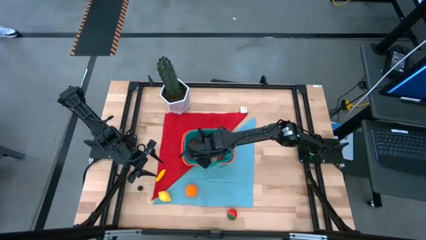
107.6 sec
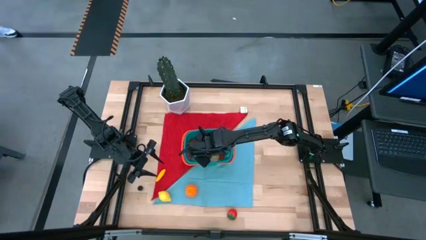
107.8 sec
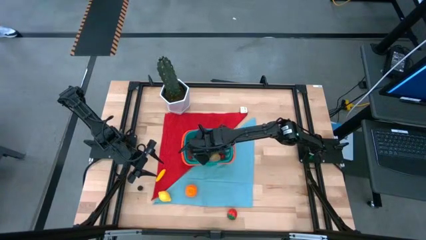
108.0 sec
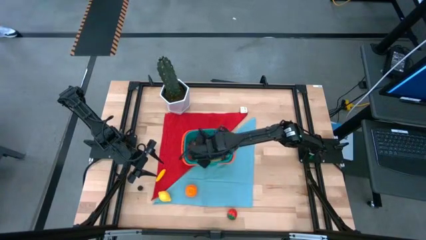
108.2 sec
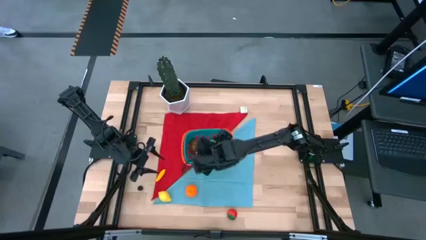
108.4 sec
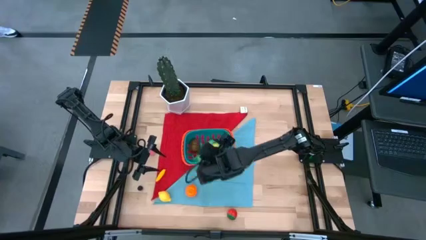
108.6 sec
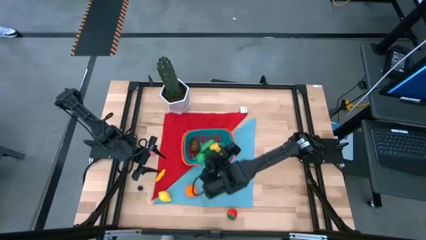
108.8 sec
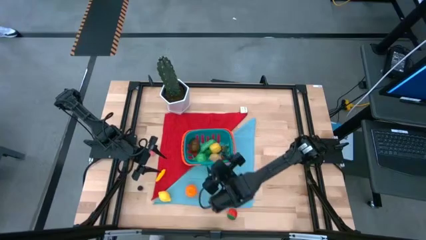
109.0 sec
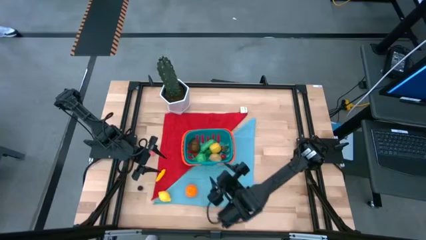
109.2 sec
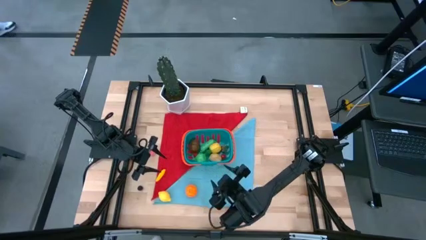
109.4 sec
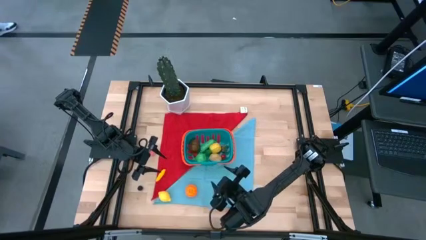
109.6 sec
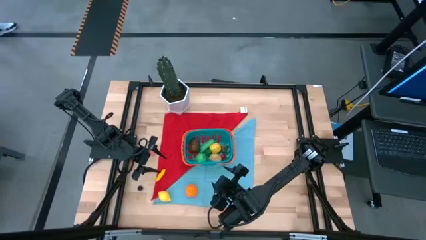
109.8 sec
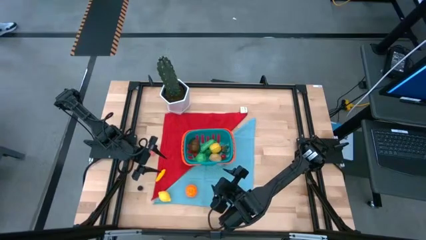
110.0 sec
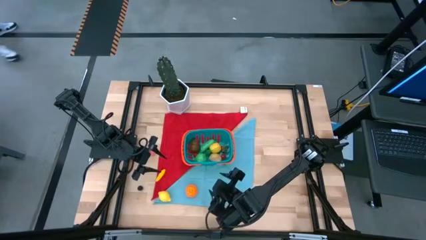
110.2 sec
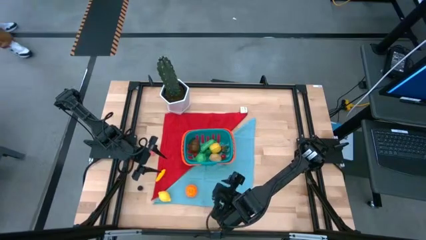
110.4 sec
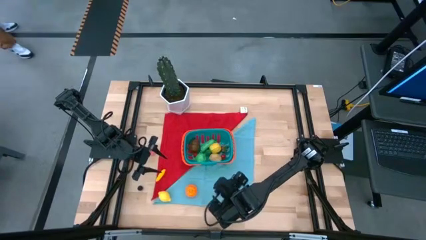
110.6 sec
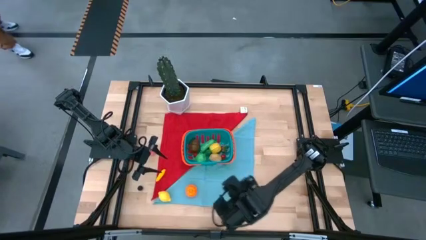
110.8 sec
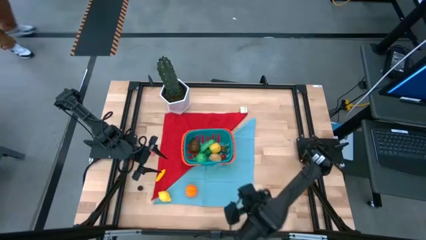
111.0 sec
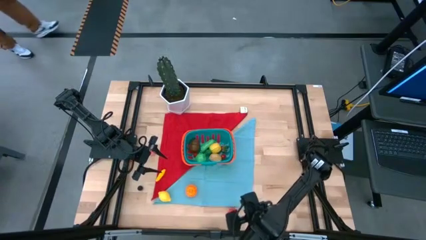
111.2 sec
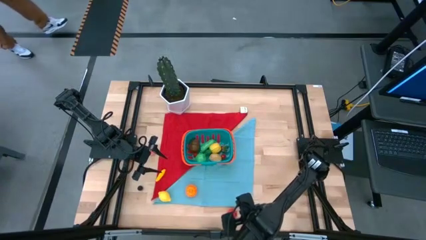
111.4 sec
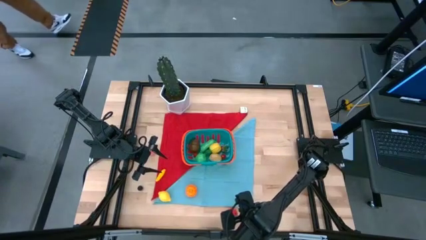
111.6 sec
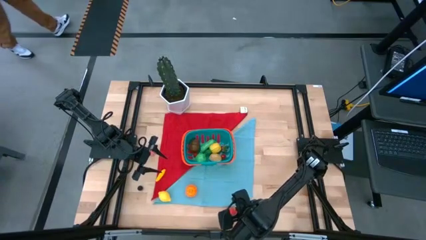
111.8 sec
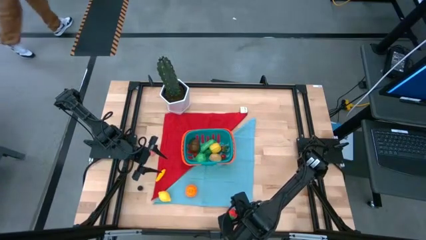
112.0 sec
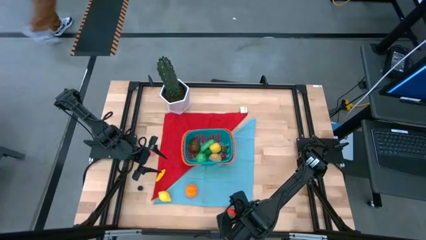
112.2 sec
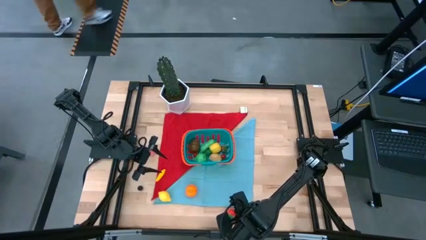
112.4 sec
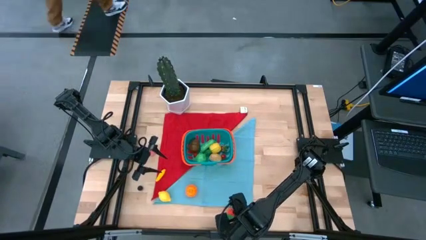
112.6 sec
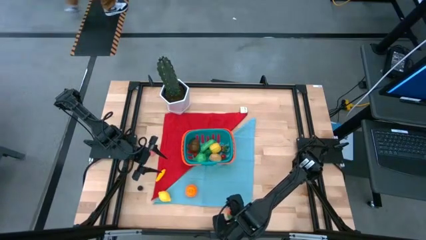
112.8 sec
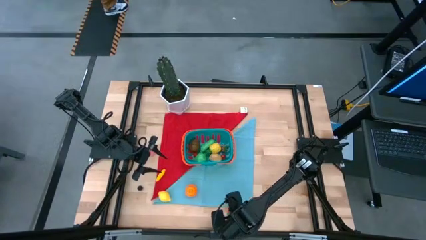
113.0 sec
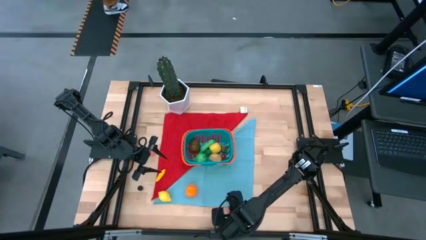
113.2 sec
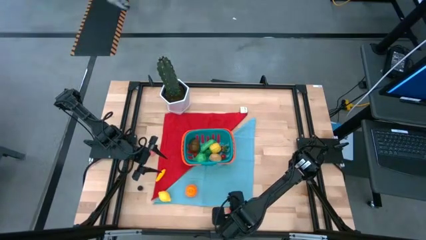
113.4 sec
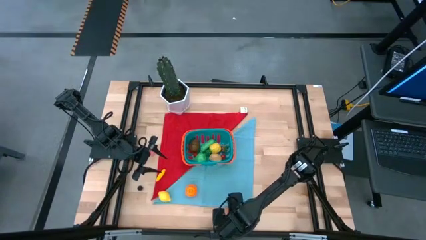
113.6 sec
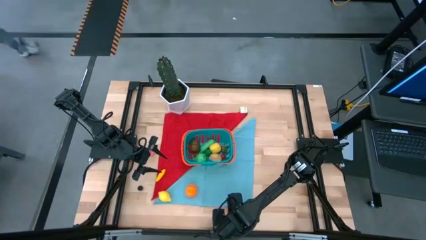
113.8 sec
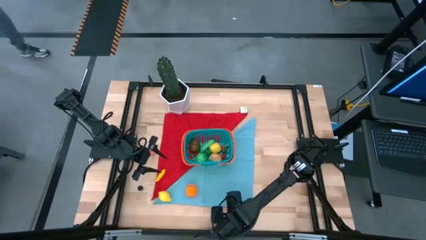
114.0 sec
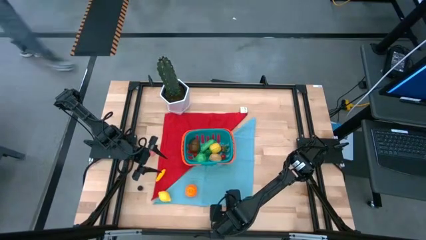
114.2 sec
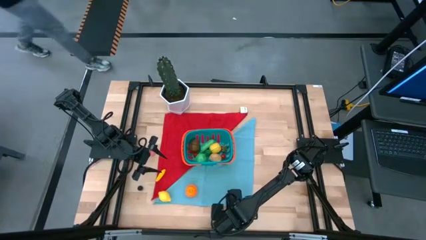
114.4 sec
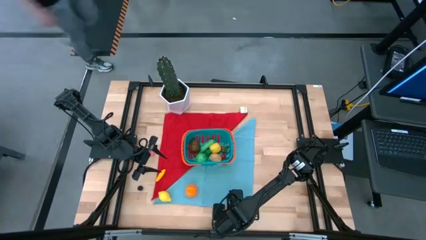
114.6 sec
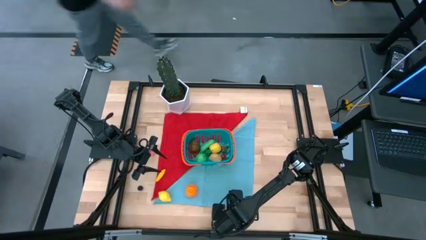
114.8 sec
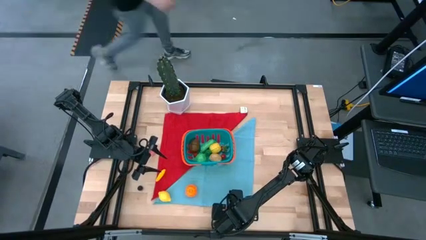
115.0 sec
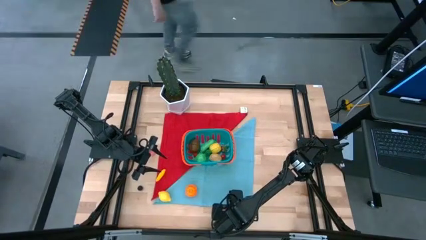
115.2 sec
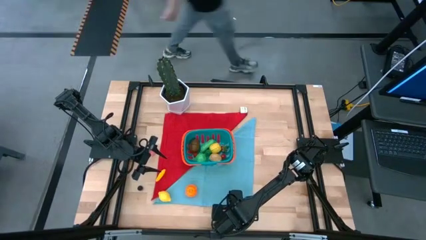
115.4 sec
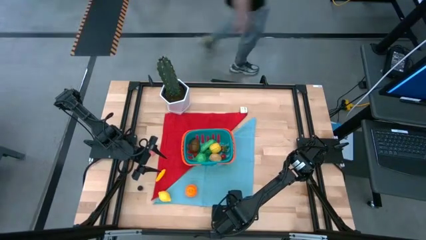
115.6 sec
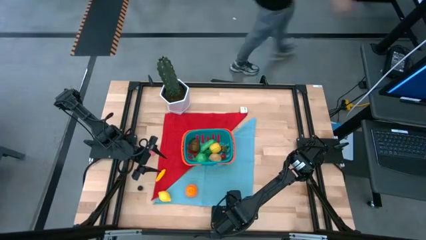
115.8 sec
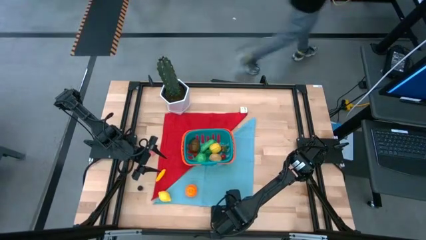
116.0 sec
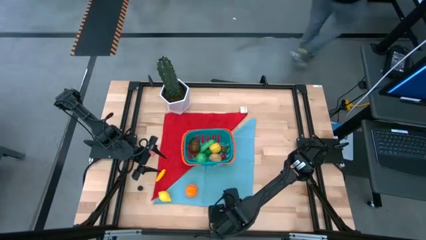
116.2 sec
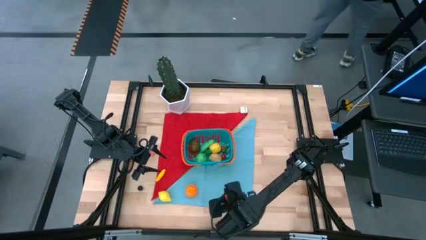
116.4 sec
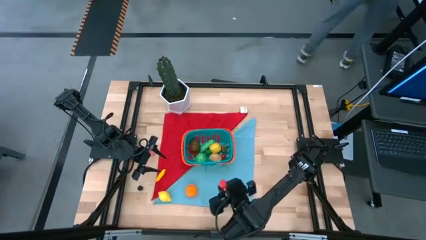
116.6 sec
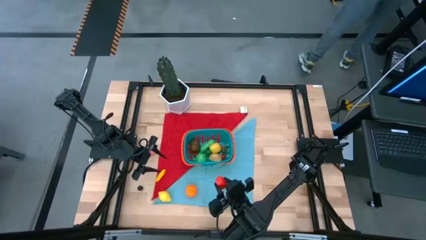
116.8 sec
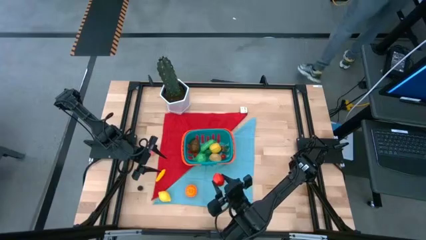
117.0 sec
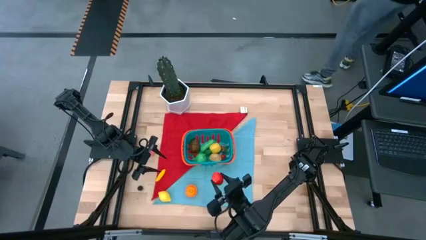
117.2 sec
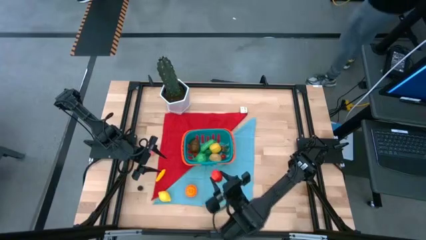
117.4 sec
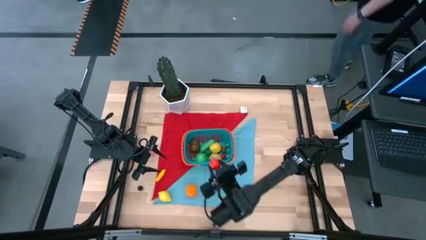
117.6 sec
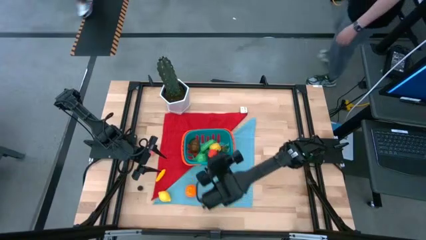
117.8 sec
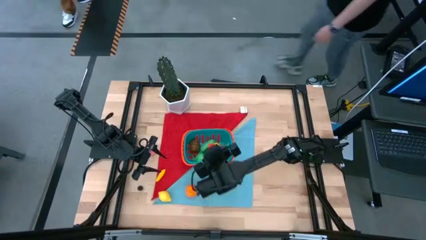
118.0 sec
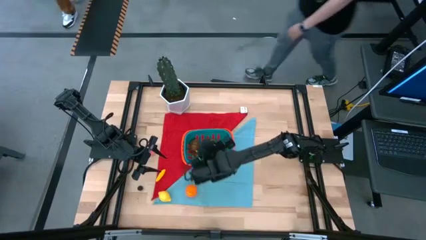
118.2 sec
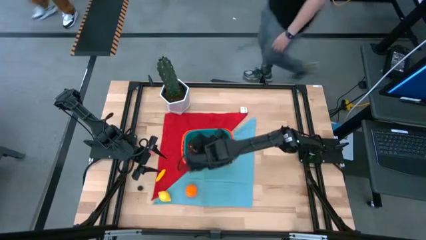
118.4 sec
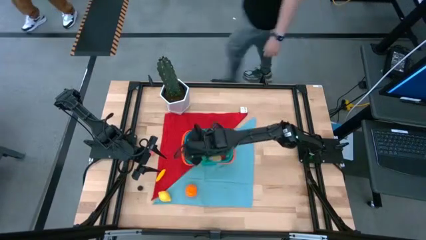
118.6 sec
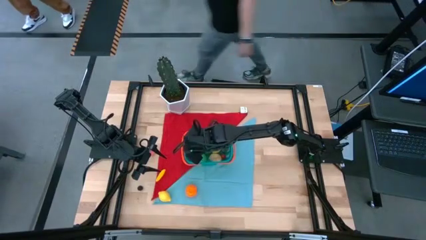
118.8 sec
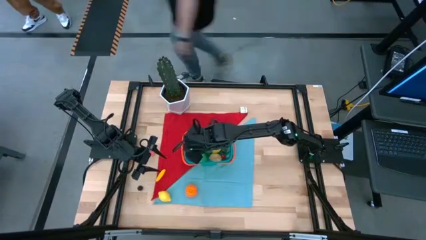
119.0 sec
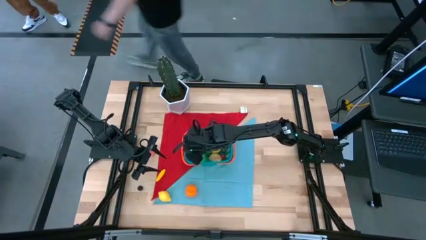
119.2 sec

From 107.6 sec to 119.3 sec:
Task: Build produce basket
Put the red strawberry into the blue basket

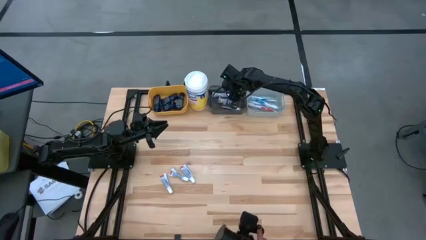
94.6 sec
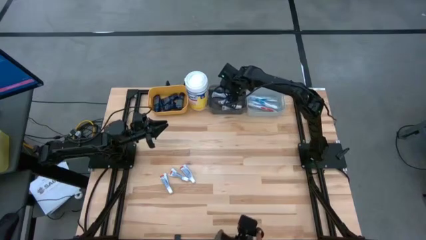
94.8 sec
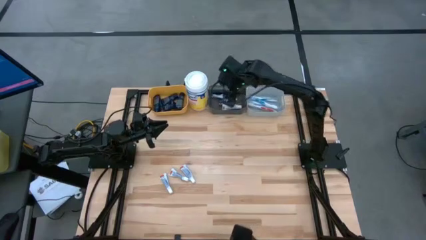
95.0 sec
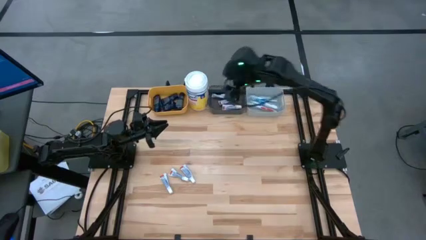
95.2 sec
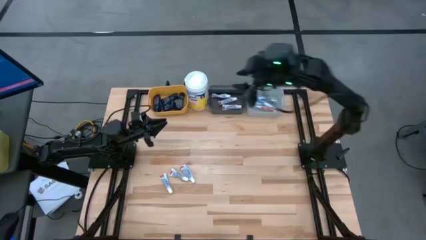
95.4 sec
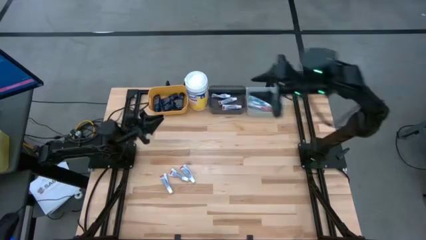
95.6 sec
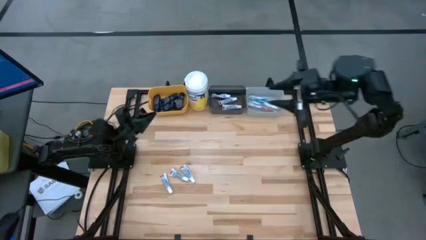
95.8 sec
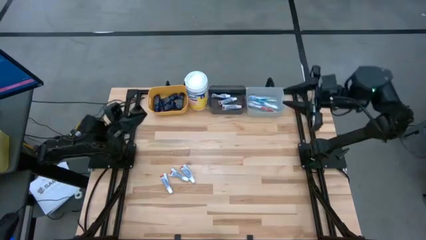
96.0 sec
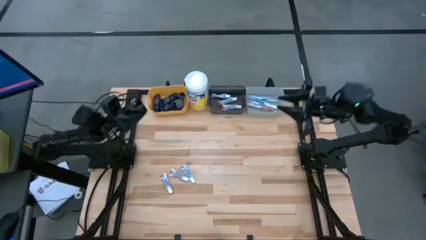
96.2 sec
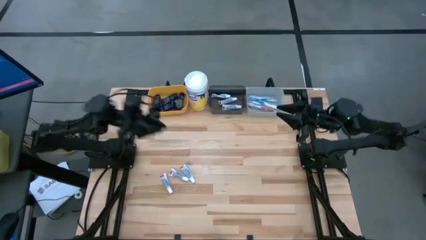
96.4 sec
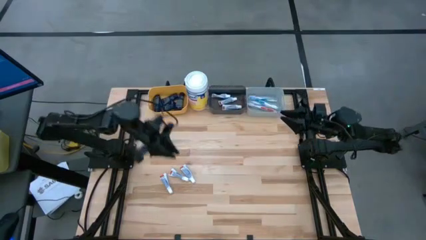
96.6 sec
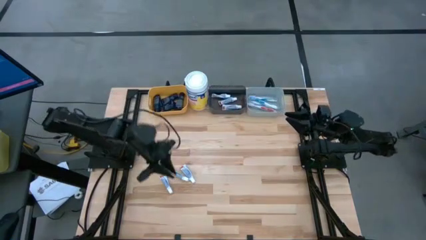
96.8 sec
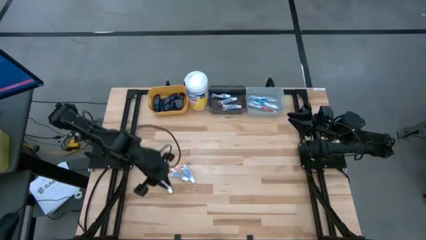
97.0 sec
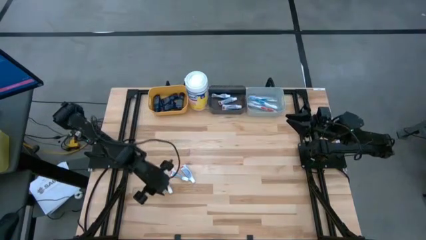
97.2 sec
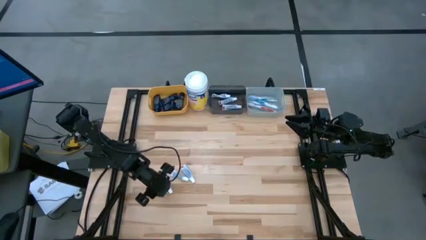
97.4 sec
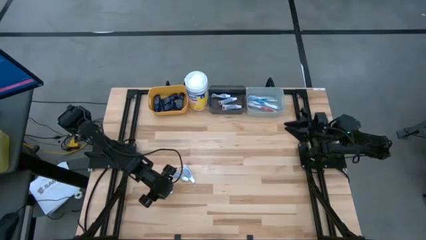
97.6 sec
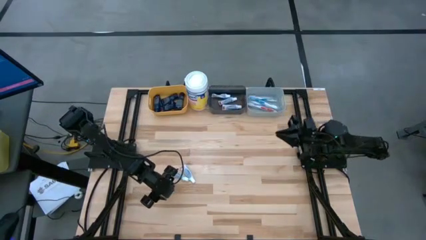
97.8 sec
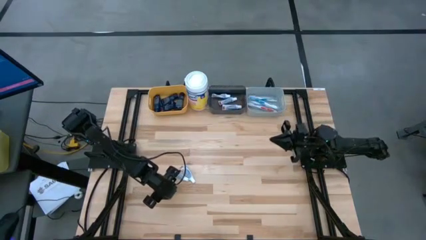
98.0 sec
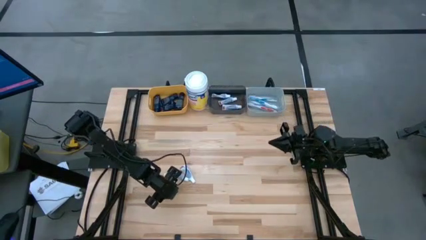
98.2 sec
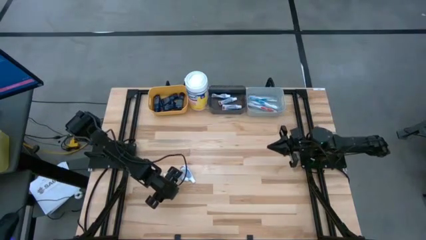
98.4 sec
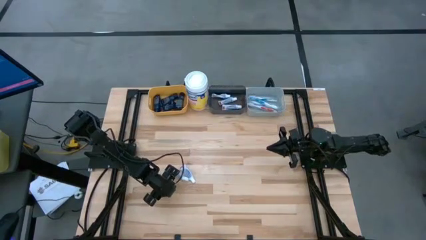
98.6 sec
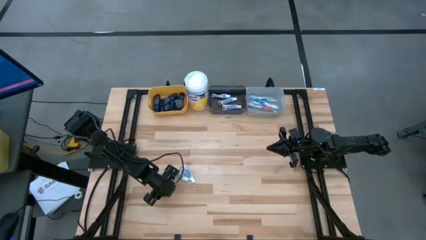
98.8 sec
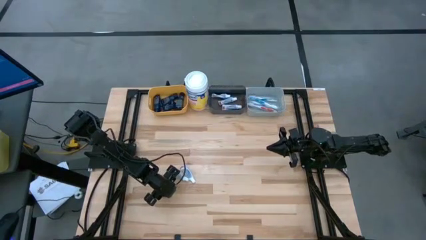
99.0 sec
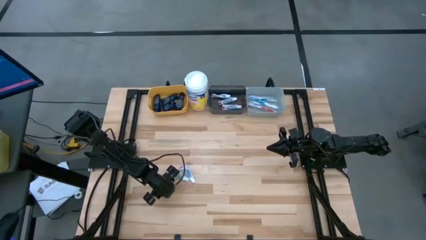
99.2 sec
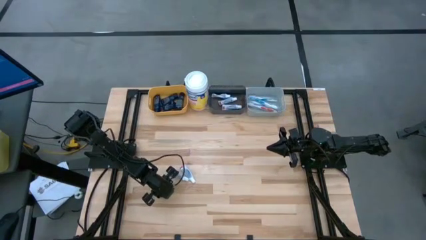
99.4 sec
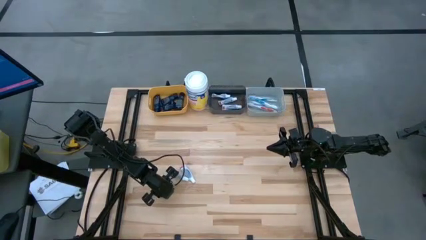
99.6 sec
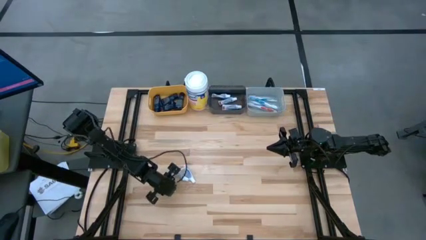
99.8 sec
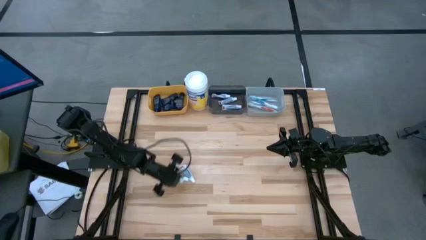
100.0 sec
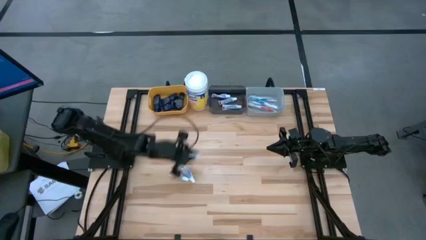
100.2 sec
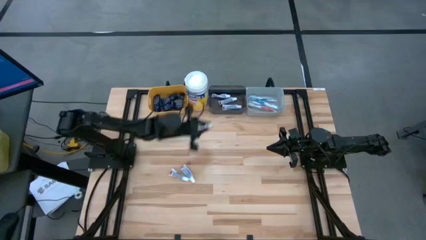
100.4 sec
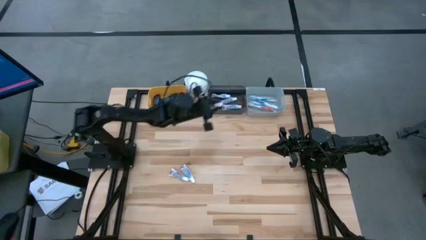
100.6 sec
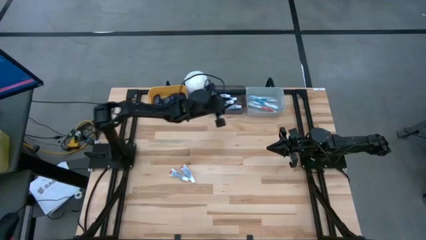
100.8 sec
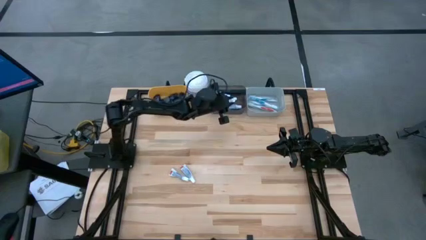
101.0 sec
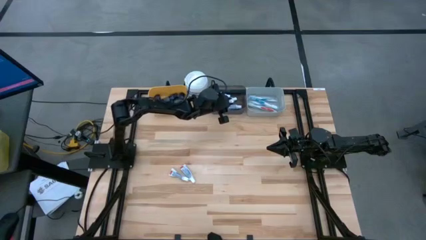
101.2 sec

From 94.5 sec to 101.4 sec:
Task: Pick & Place Travel size toiletries
Put the white toothpaste into the black bin
